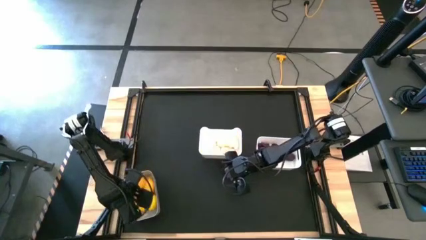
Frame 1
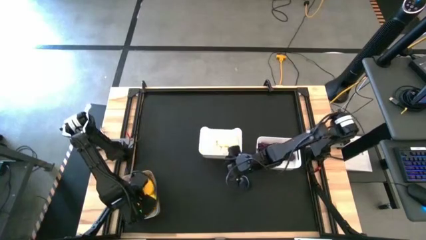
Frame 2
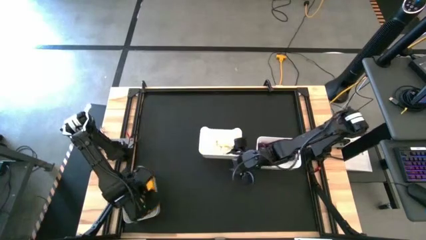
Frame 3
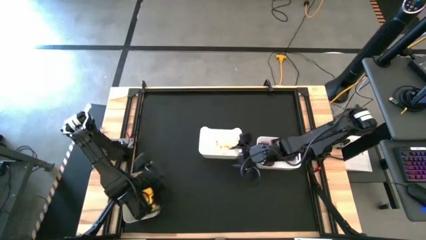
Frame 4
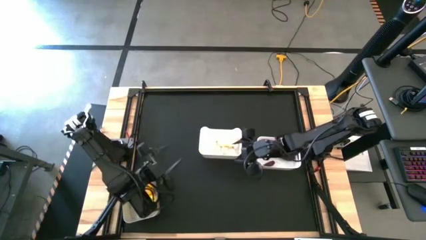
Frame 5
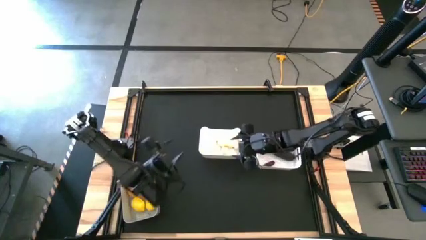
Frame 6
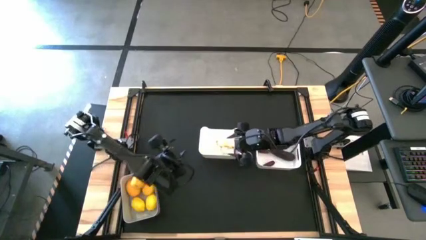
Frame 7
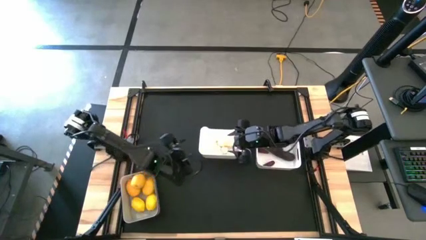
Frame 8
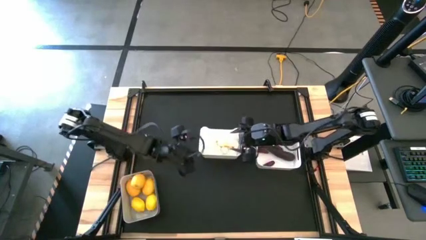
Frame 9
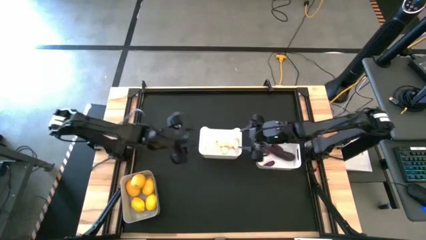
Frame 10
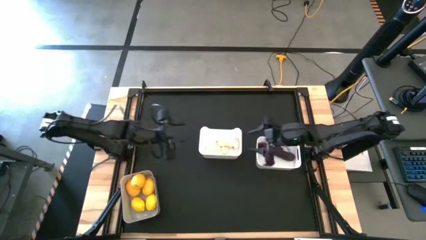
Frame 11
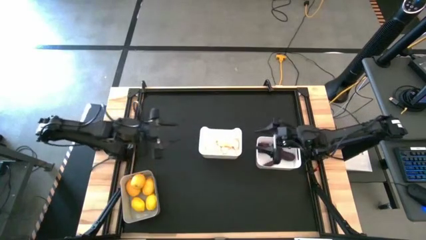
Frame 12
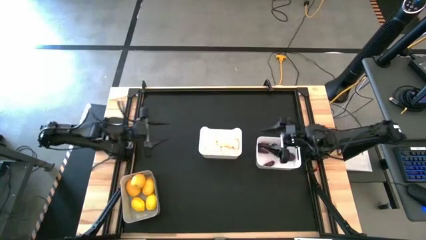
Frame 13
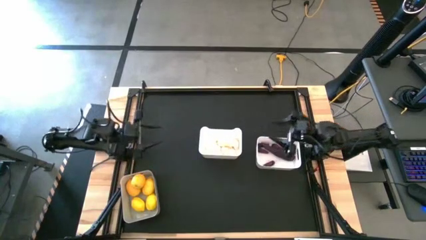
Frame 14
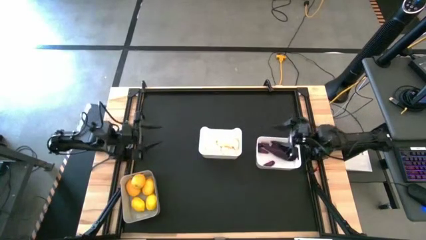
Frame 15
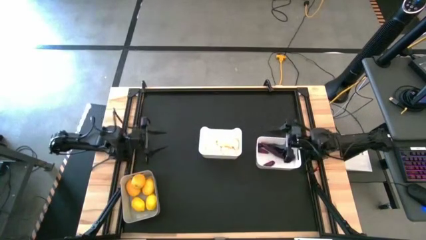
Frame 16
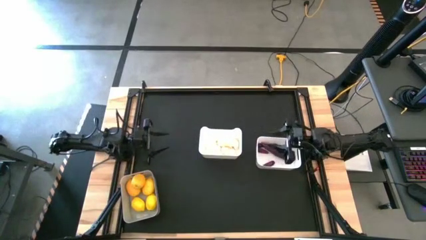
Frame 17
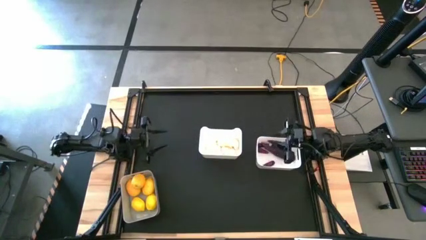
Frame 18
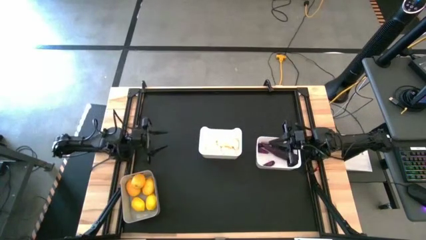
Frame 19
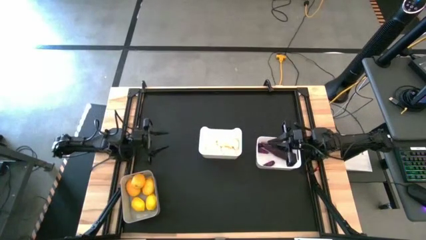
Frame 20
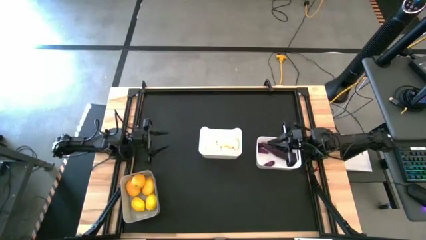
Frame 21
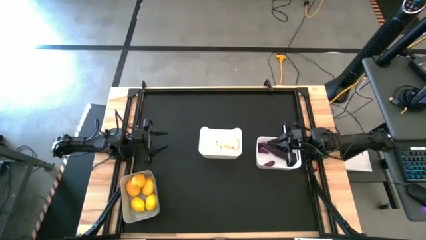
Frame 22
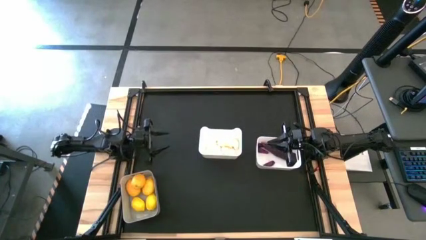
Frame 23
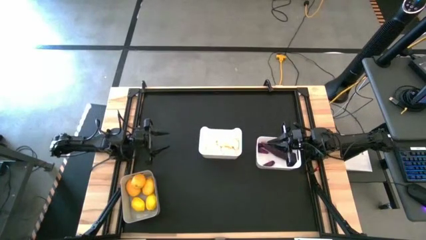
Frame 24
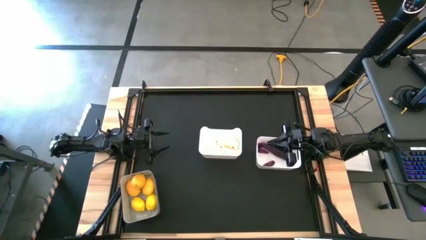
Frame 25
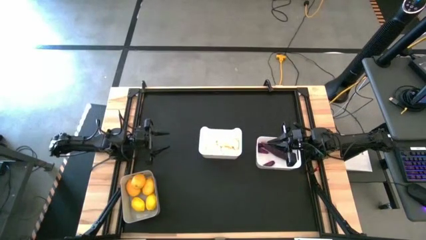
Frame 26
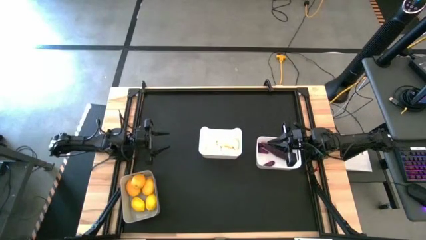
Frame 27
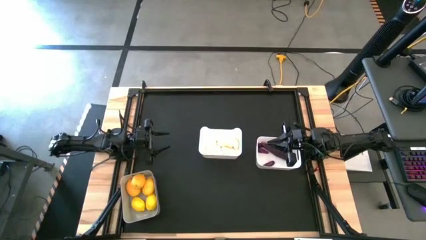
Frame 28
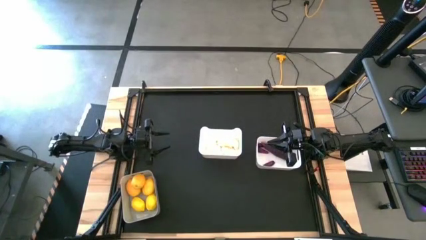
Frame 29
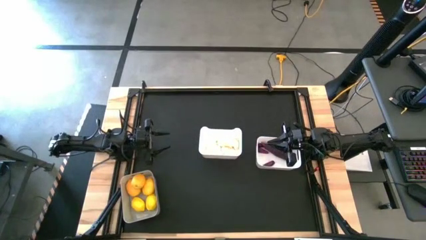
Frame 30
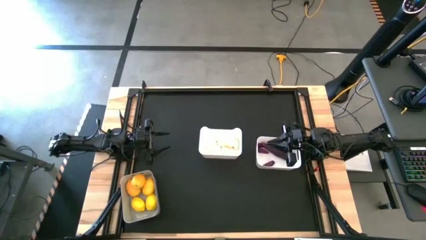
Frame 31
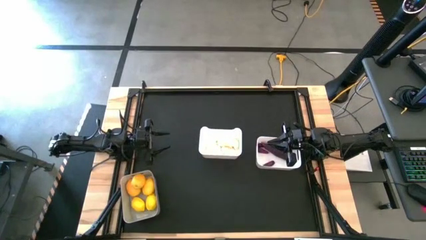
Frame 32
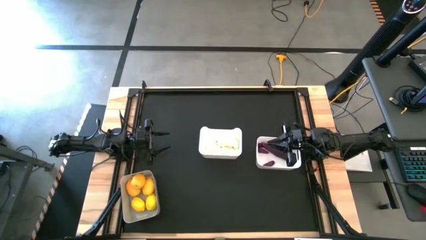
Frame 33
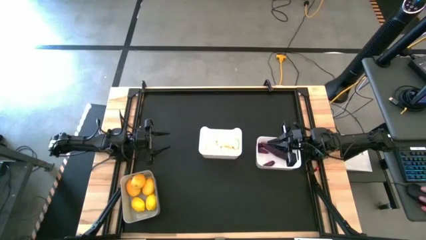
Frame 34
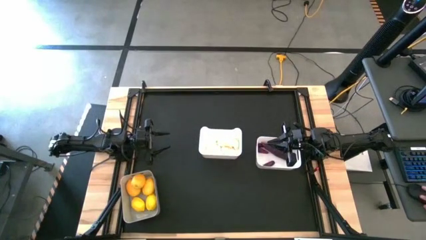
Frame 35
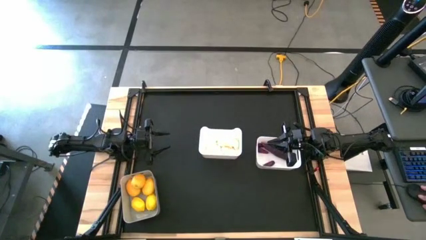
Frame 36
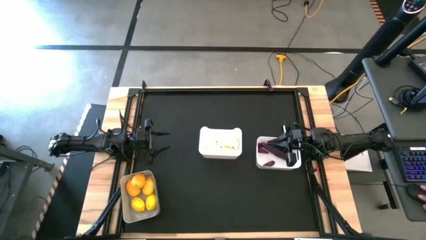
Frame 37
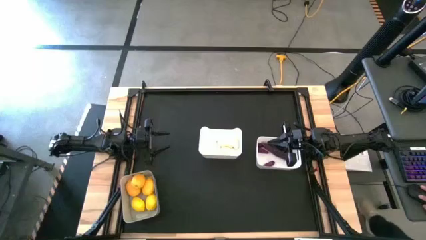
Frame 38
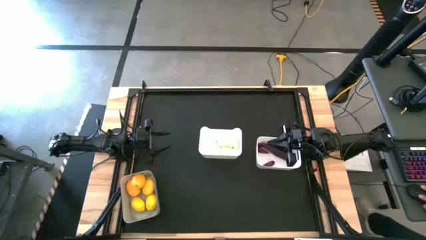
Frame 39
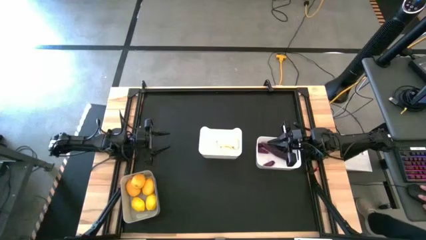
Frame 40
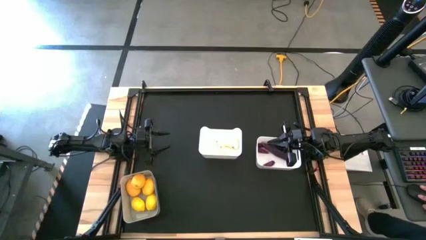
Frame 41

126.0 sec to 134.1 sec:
Task: Sort produce into baskets
Return to Home Position

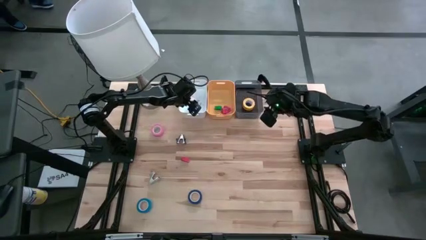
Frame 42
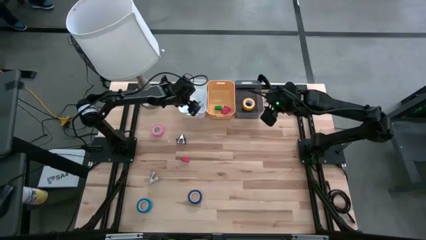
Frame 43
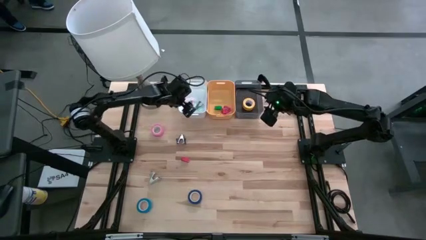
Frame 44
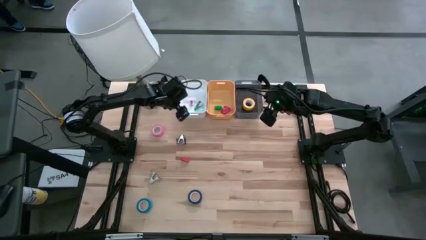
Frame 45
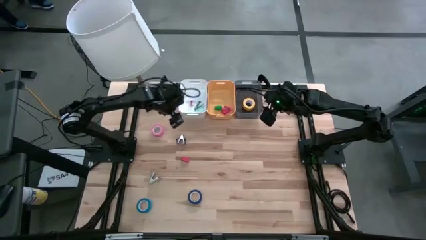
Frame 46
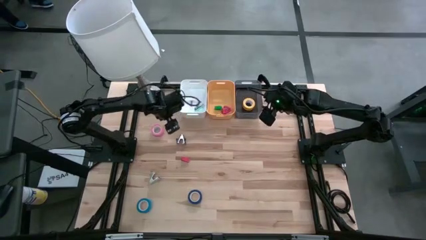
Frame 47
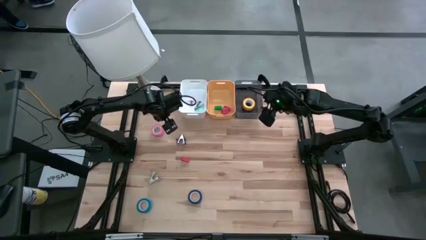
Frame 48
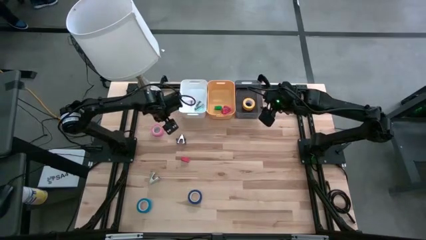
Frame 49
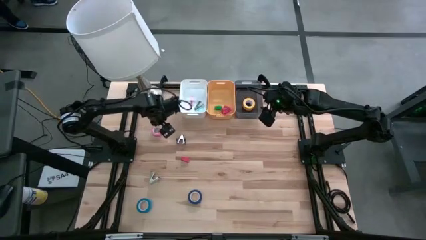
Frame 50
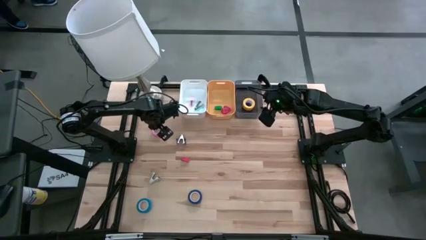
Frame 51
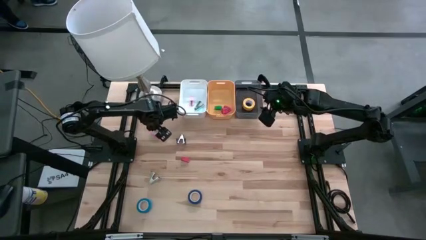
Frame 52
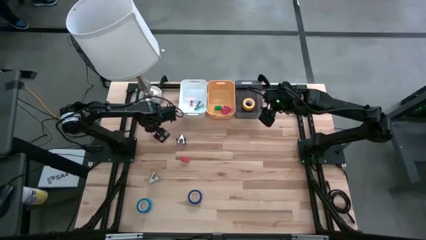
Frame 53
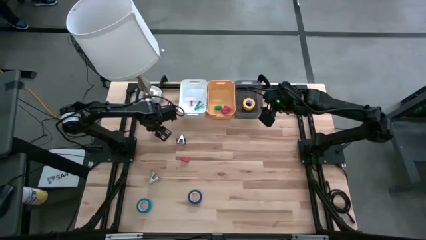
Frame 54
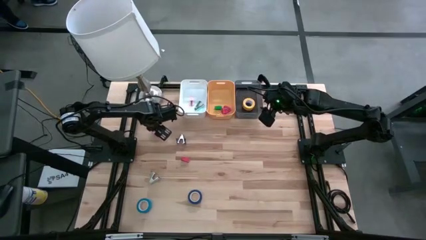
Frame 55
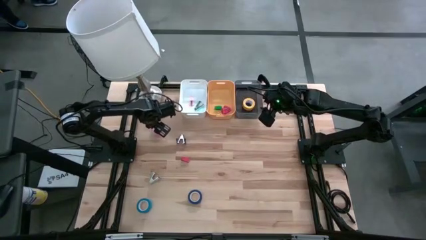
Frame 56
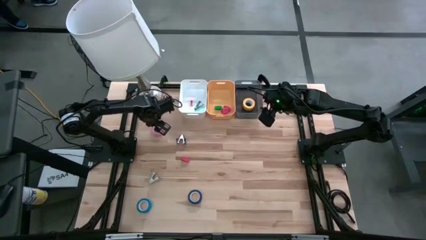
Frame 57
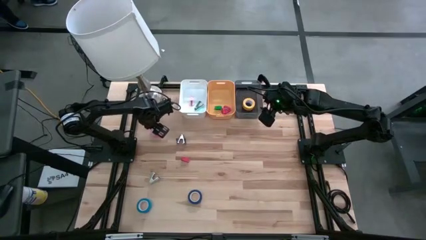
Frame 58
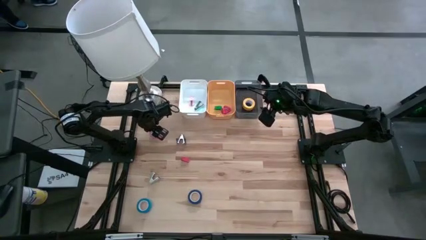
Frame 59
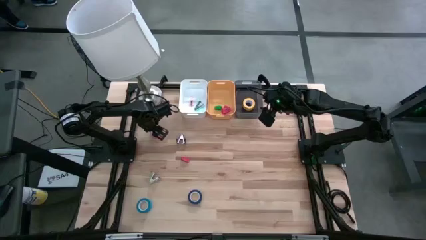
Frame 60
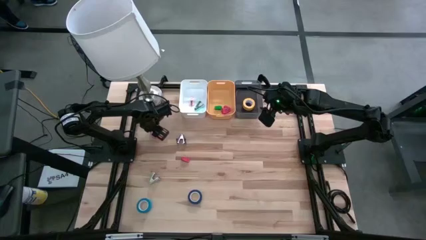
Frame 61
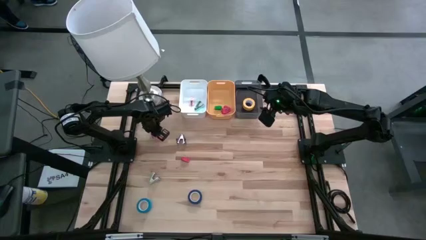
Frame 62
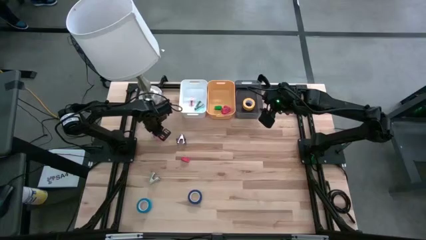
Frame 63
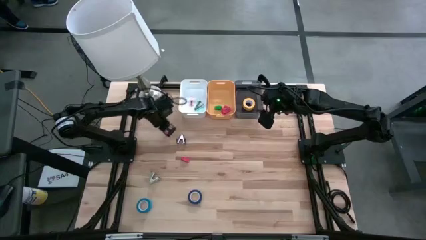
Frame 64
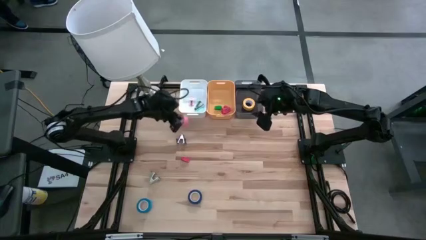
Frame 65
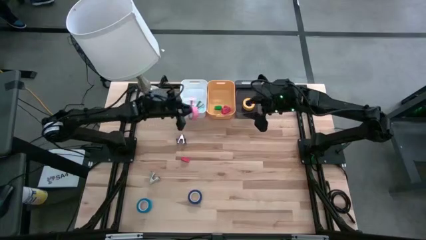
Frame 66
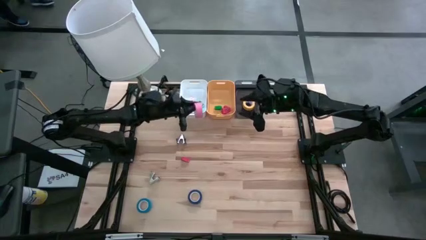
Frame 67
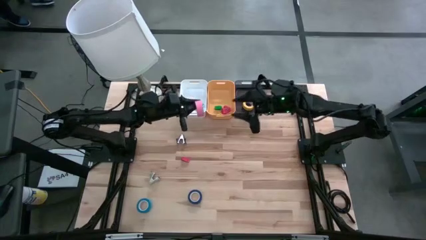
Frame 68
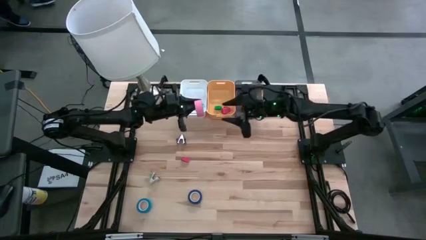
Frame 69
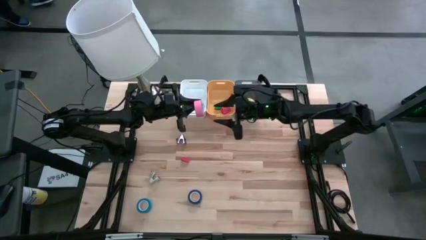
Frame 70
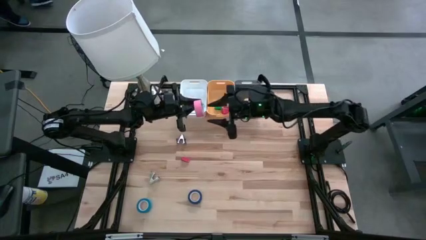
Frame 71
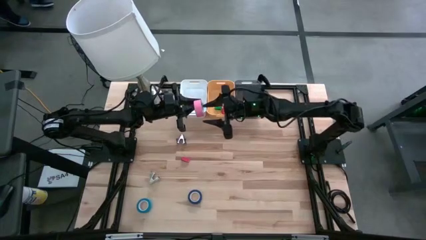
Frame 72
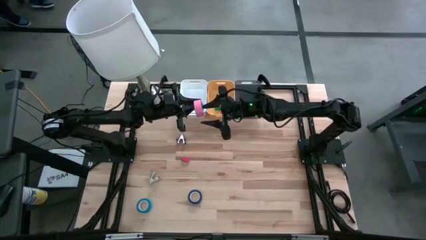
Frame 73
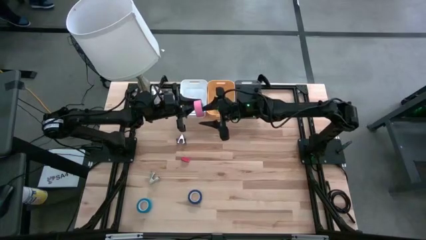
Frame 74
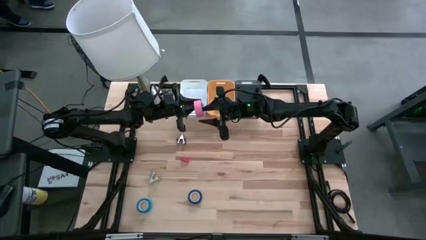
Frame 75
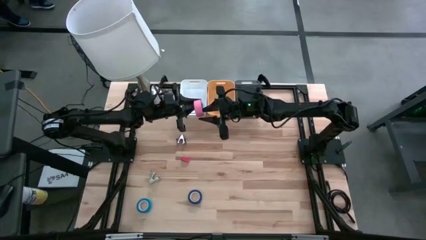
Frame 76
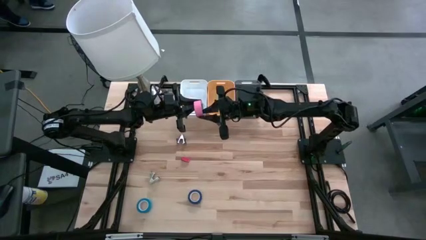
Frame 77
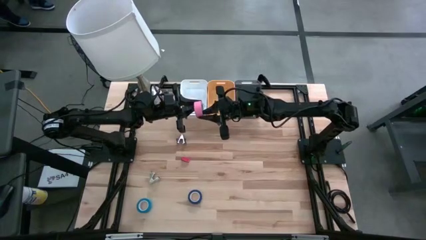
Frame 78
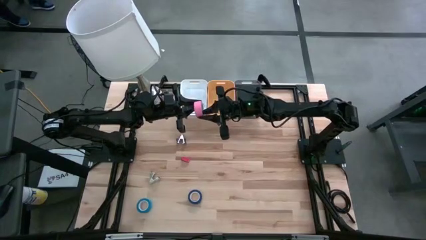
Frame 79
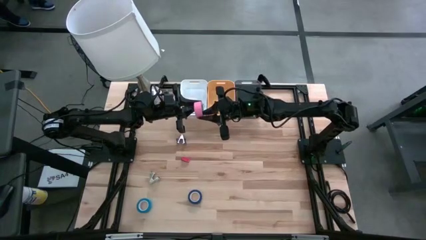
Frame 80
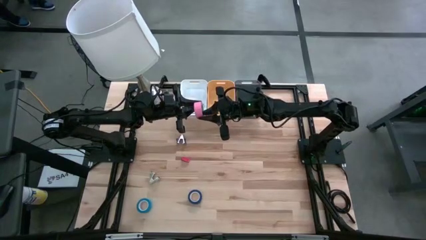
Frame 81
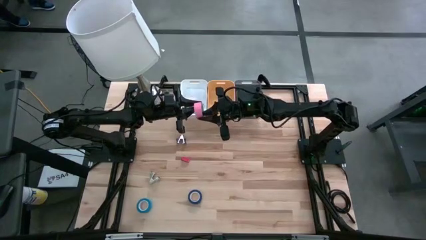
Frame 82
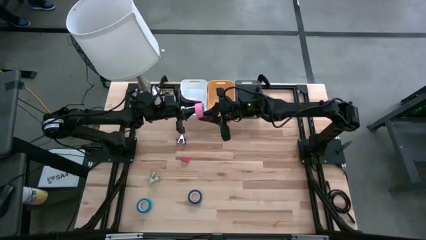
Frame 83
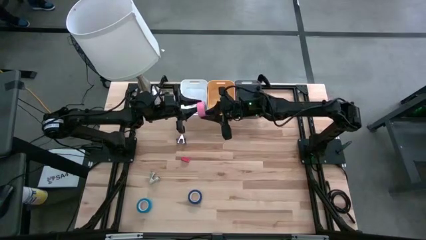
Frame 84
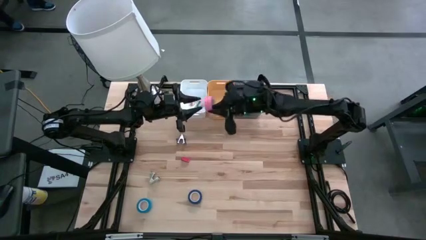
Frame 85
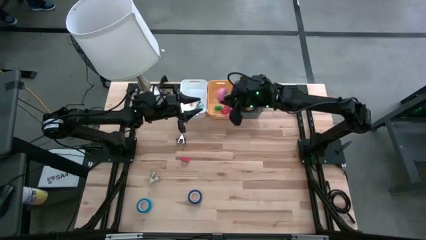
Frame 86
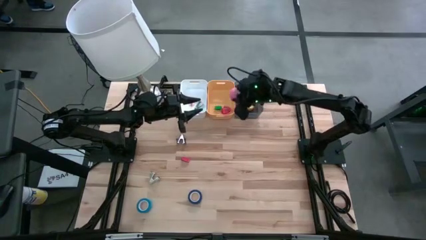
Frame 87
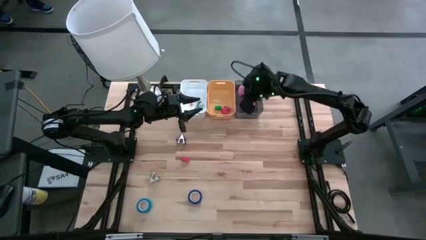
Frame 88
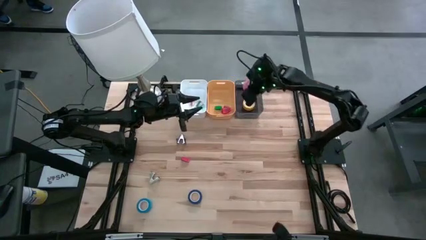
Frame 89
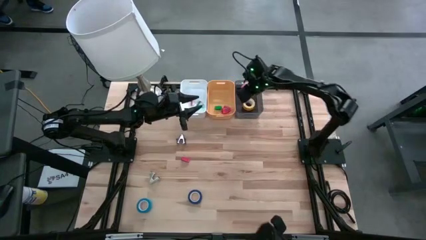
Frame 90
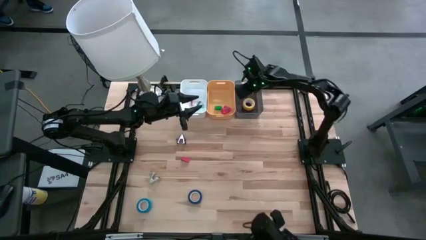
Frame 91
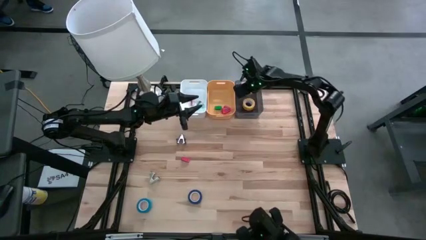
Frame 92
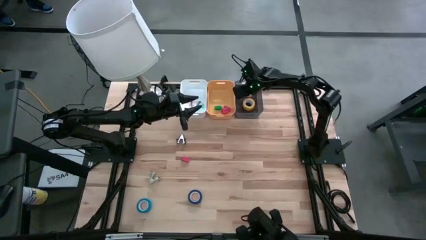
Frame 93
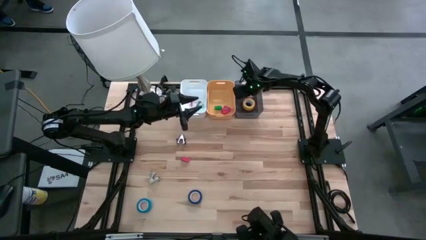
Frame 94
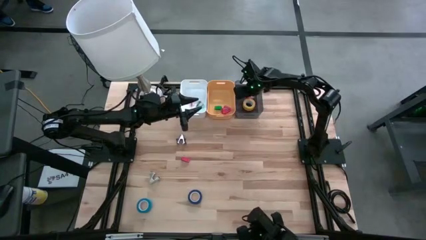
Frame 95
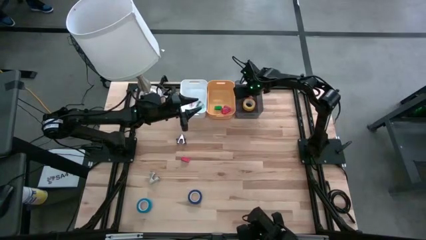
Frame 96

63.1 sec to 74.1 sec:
Task: Pick and place Stapler, Stapler remover, tape
Put the pink tape into the black bin
